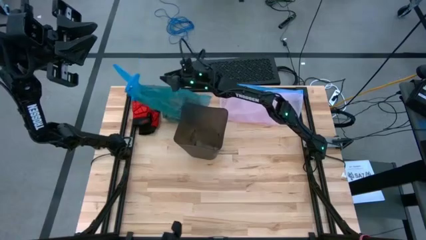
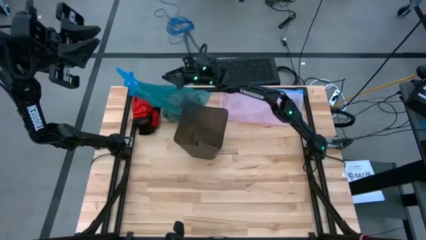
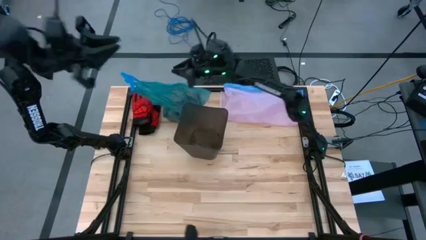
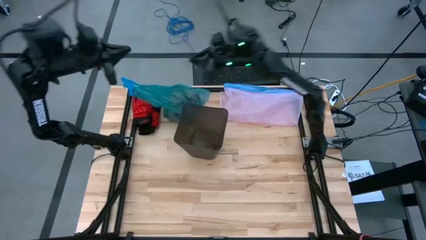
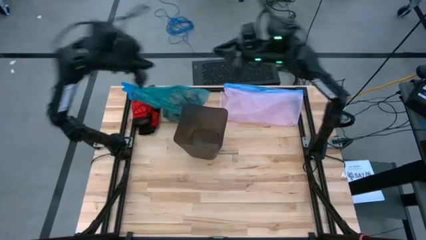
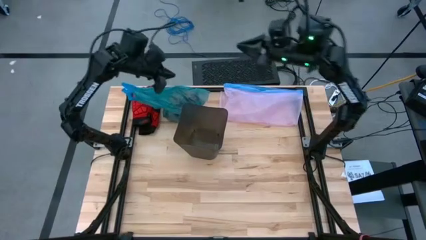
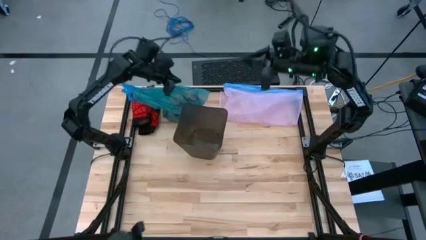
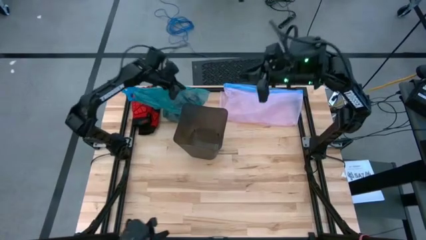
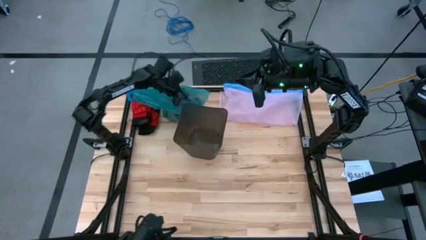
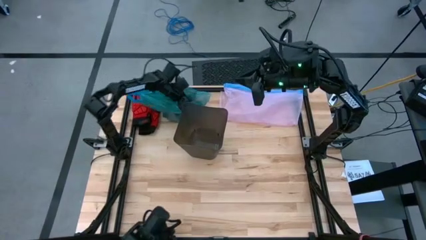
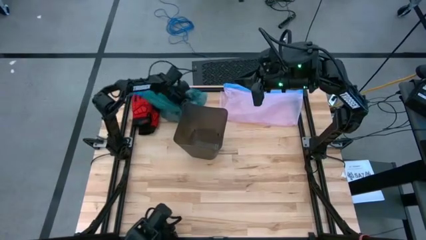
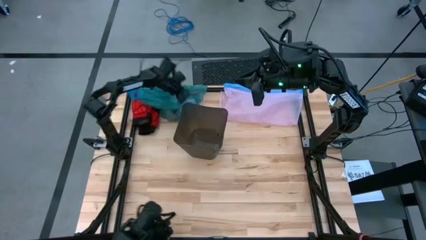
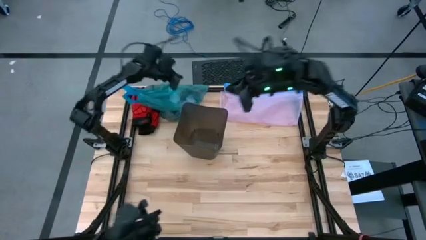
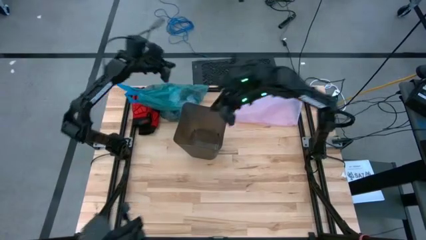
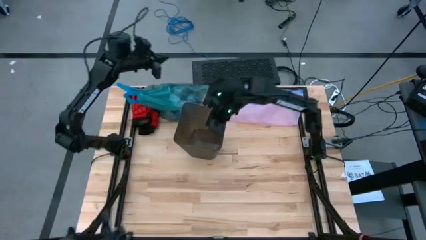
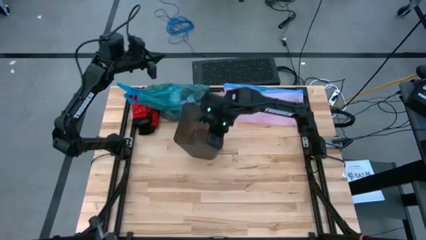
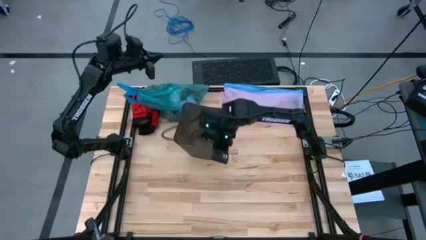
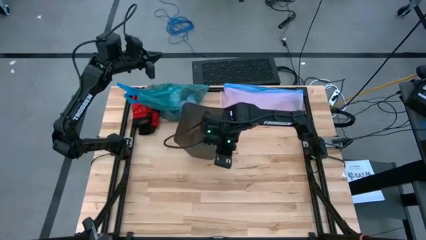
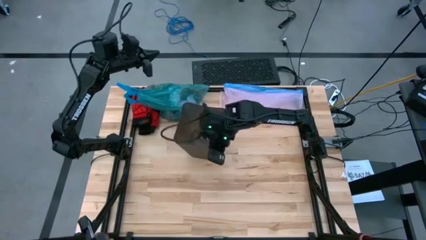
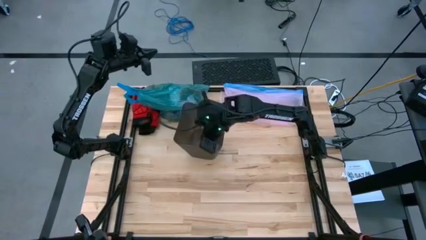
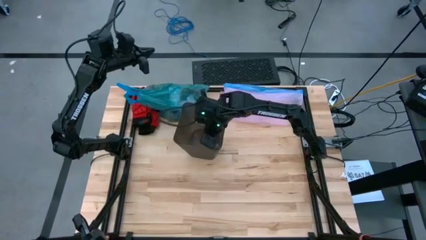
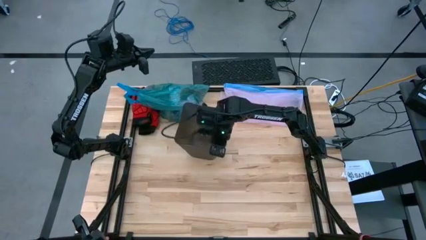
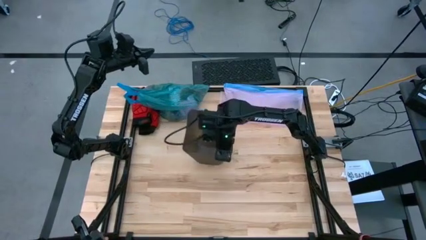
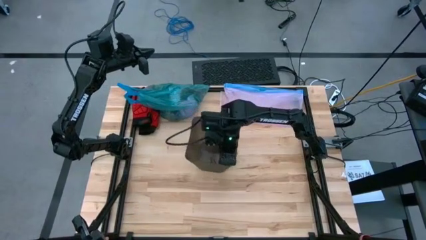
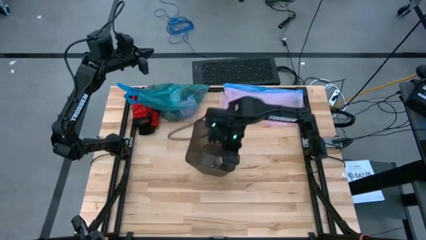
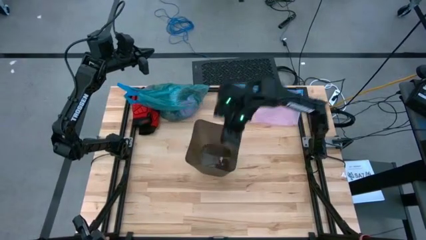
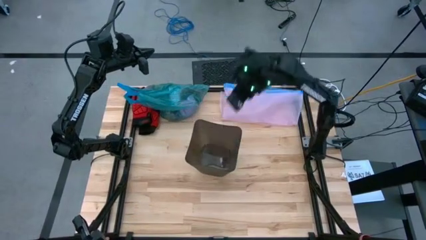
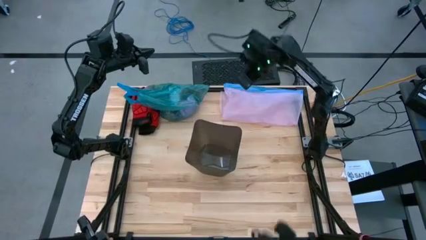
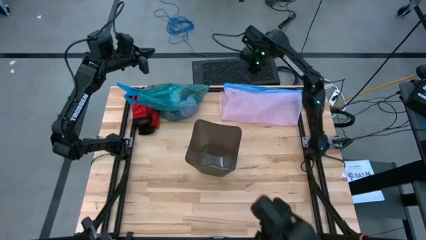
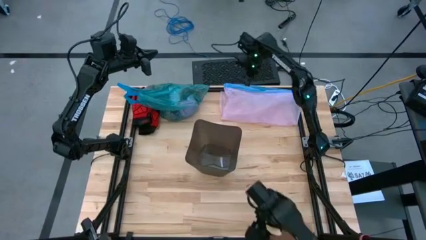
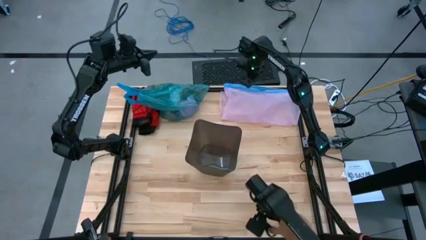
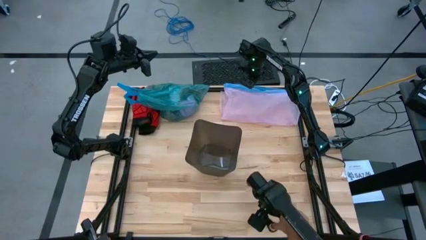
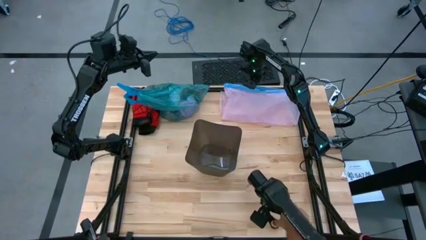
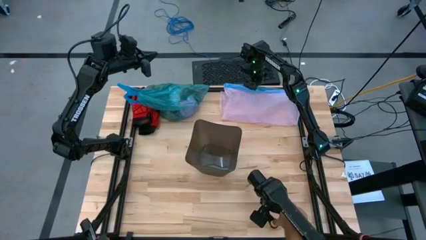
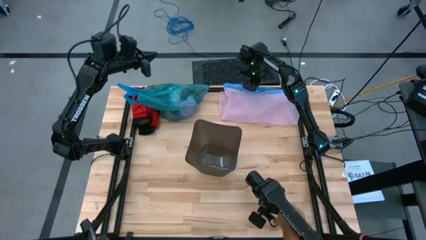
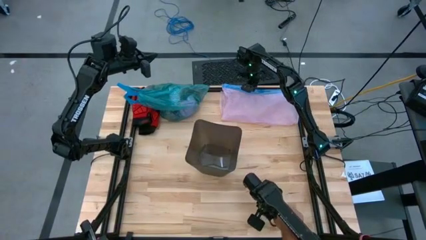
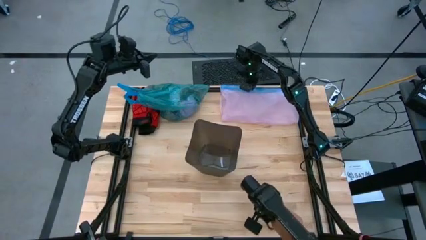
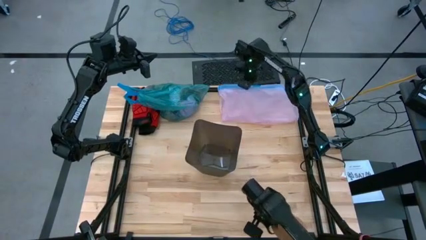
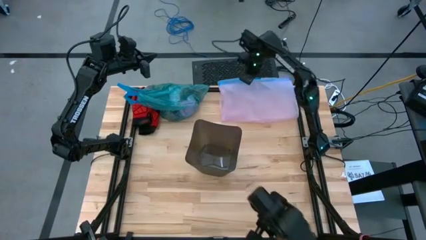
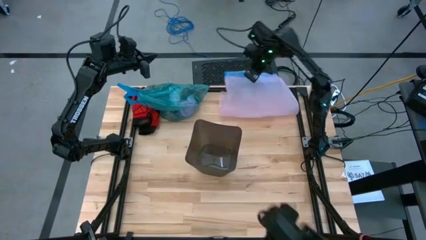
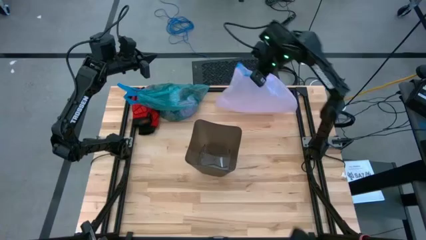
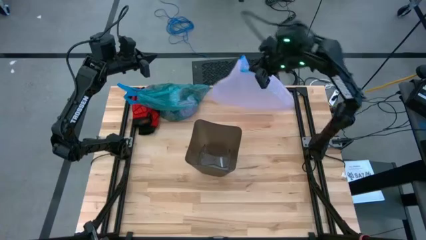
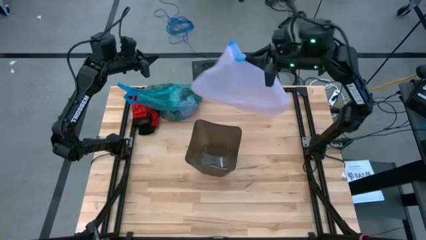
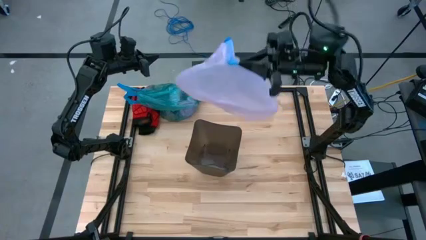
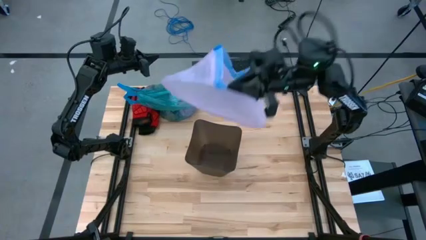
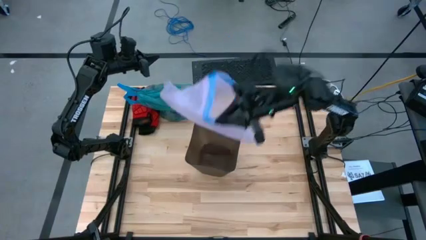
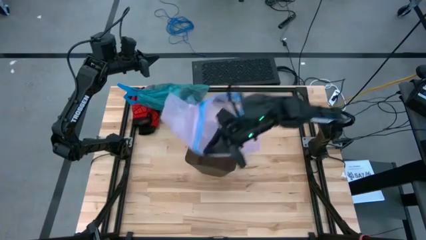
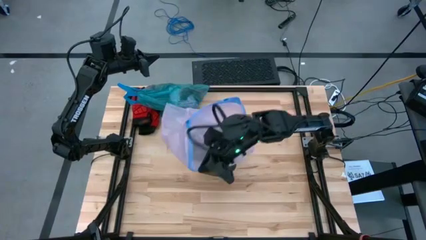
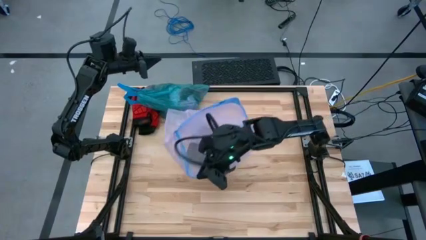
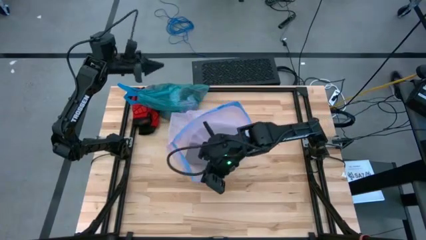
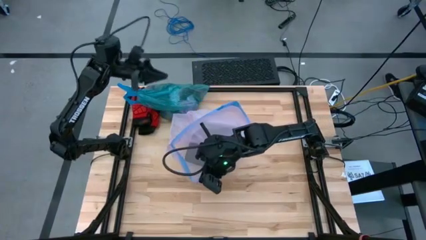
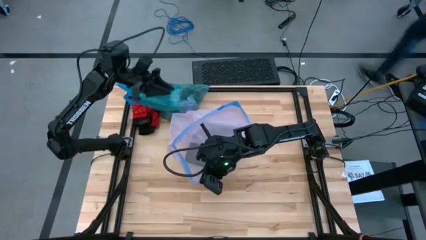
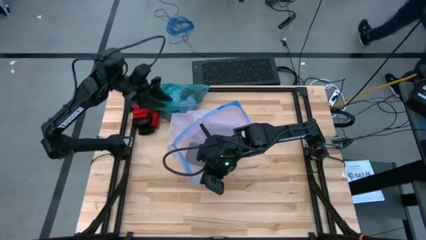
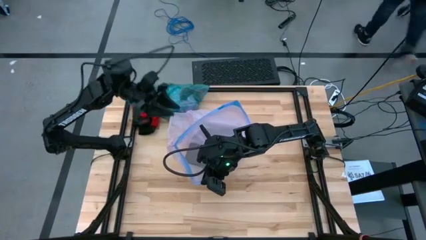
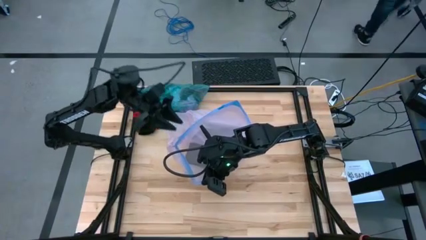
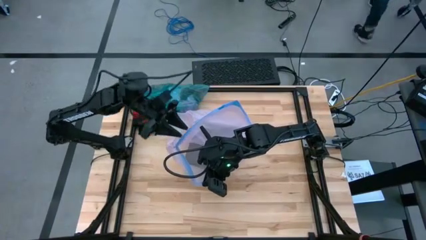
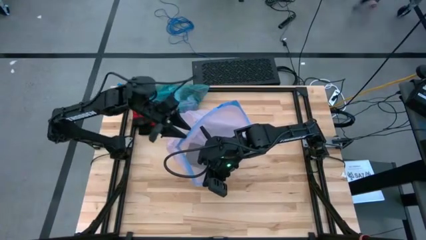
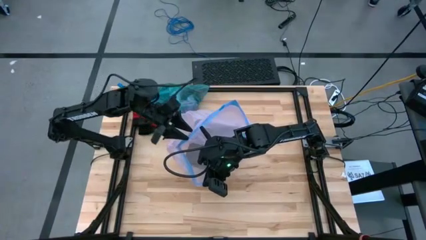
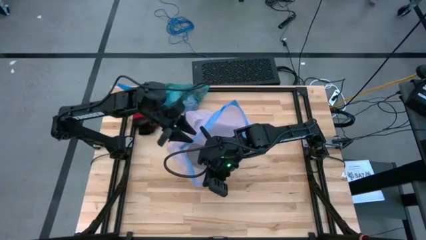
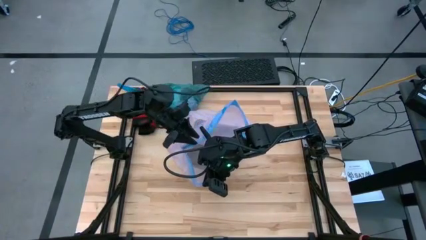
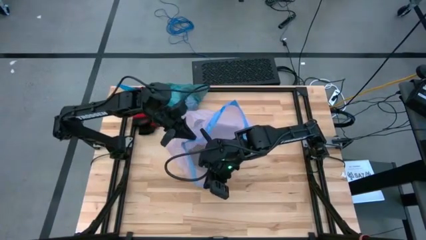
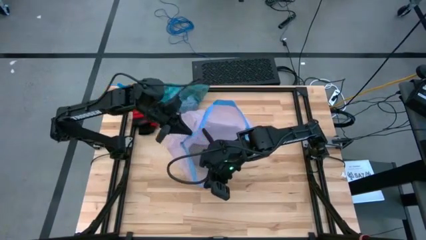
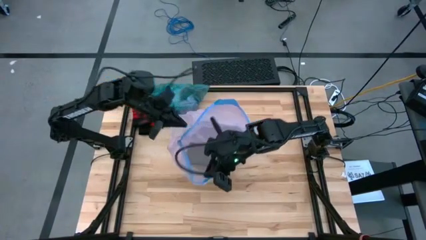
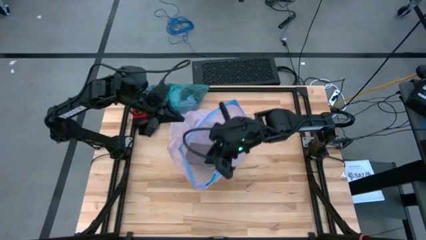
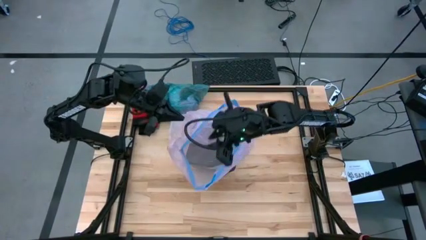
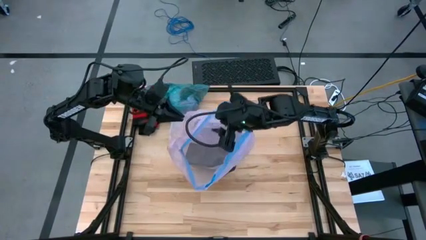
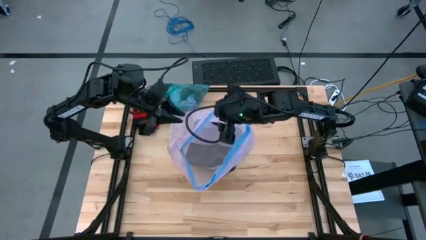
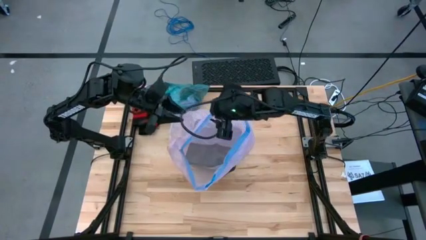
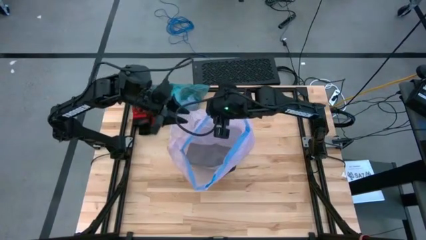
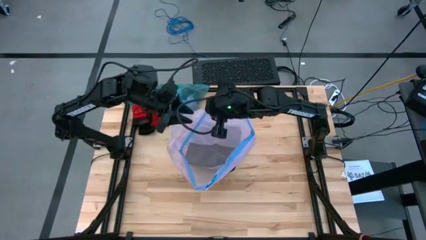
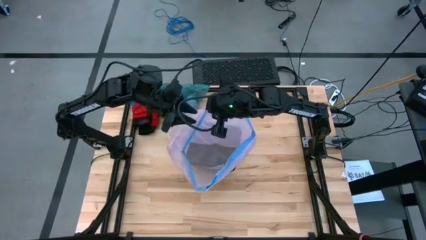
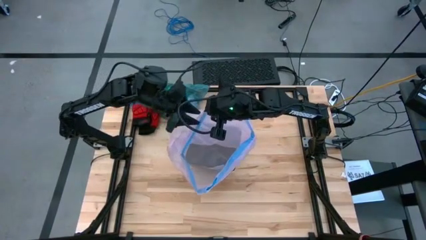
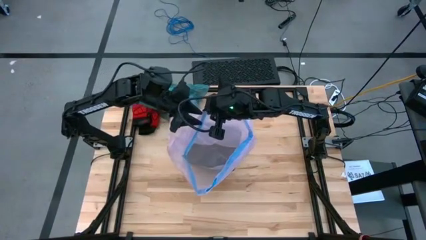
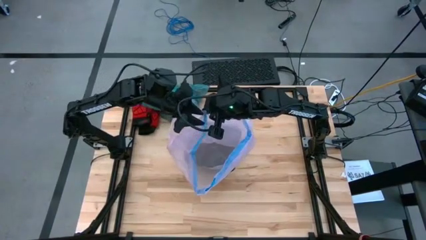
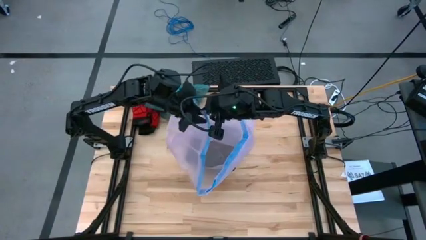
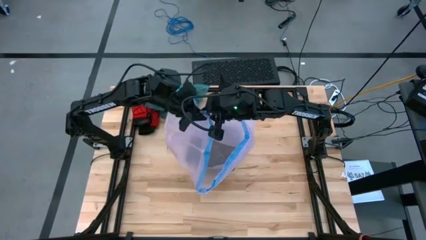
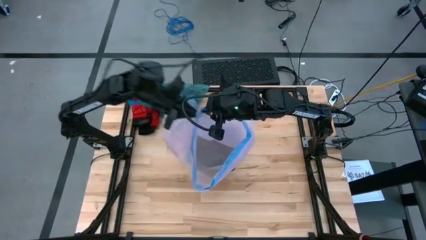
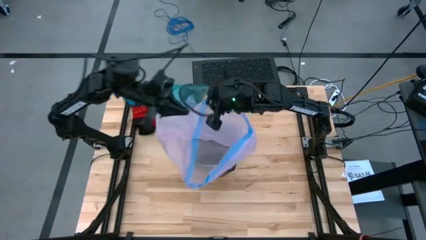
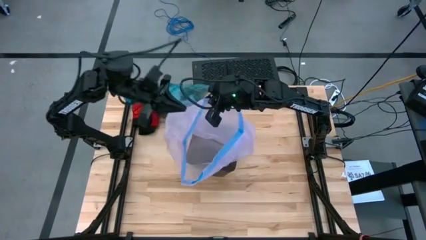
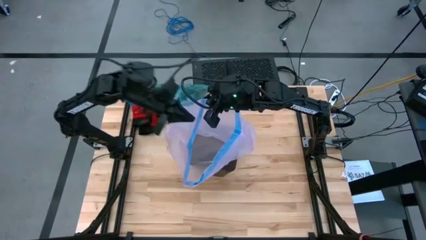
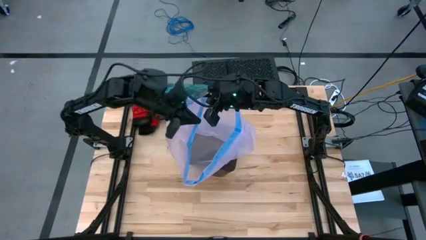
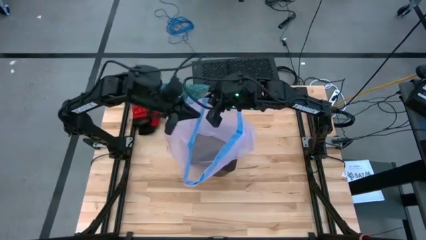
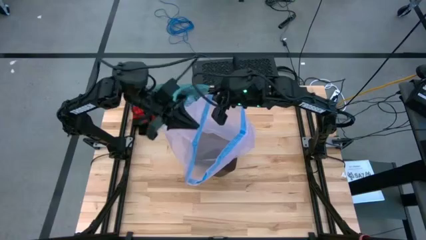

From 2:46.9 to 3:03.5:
Task: place trash/remove bag and relplace
Insert the new pink trash bag into the black trash bin
